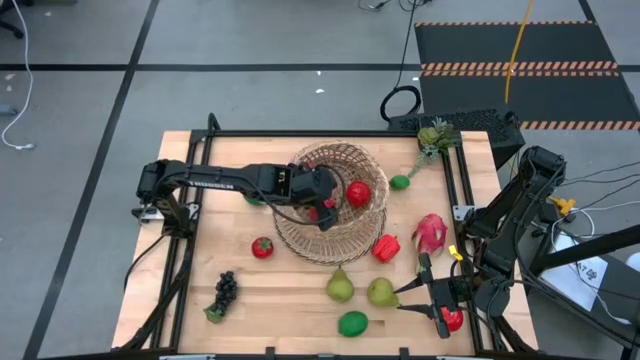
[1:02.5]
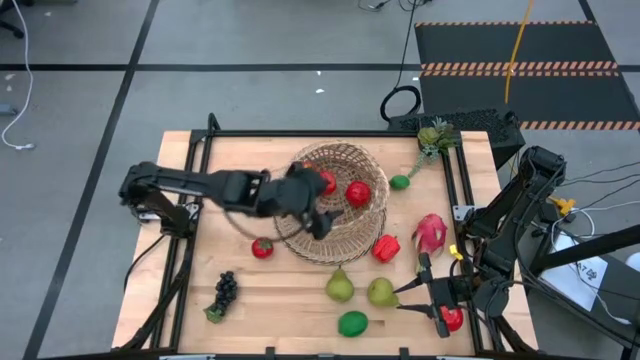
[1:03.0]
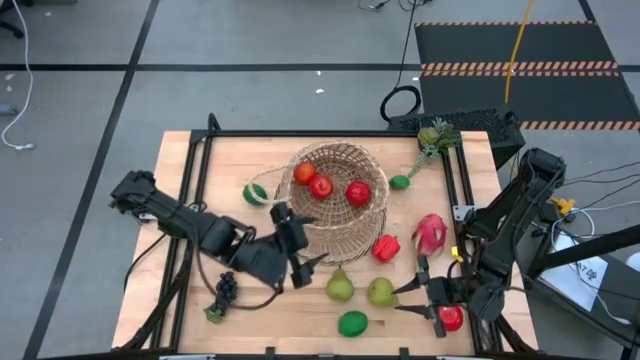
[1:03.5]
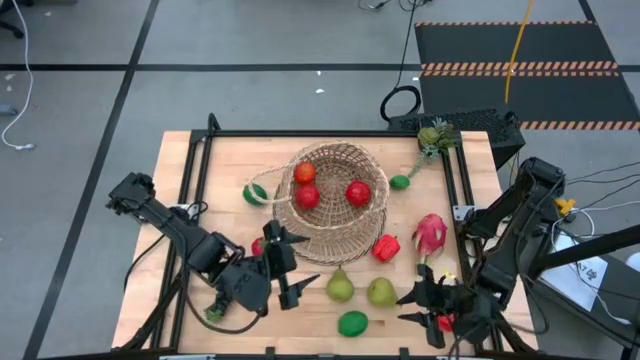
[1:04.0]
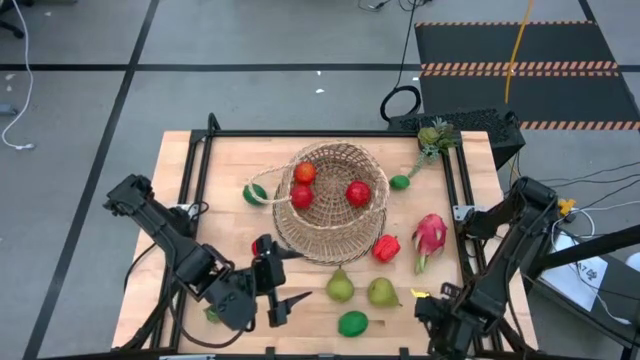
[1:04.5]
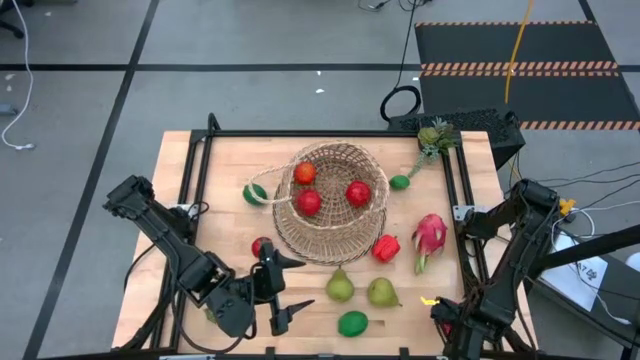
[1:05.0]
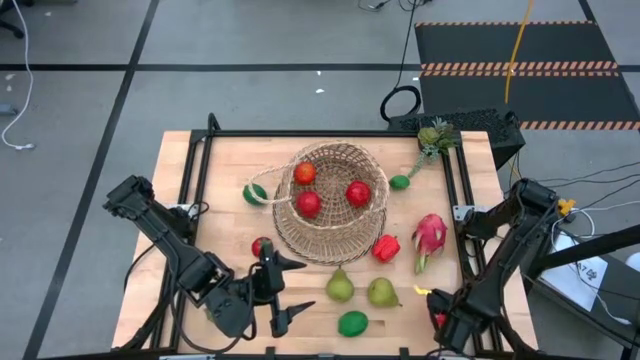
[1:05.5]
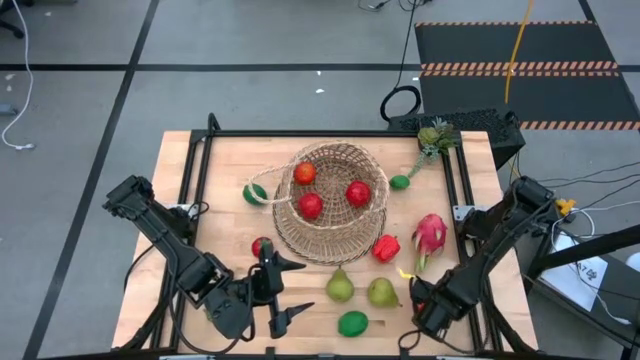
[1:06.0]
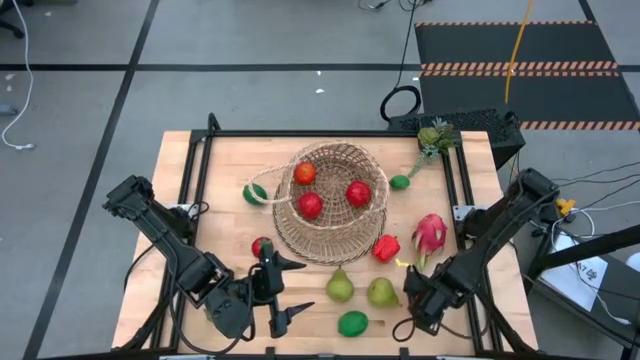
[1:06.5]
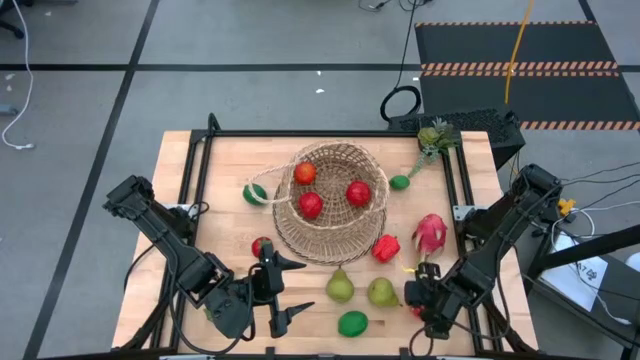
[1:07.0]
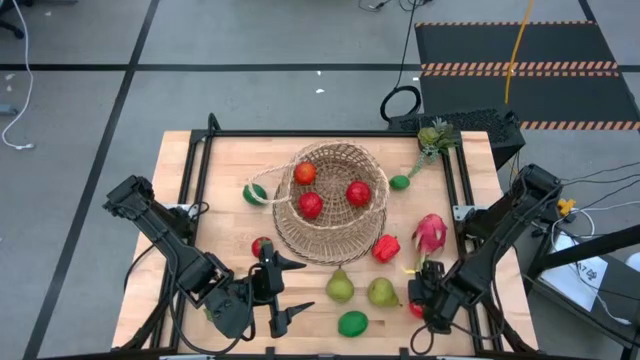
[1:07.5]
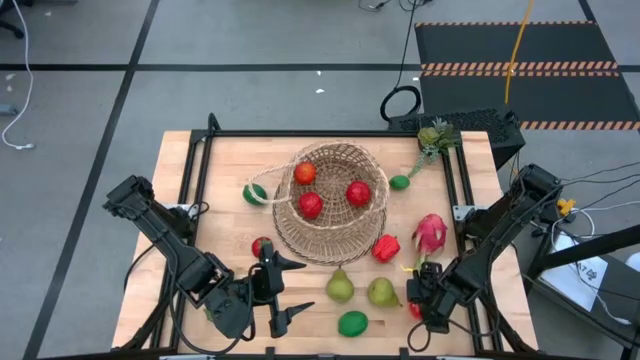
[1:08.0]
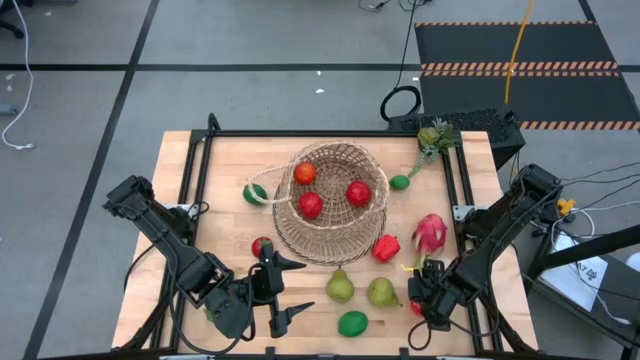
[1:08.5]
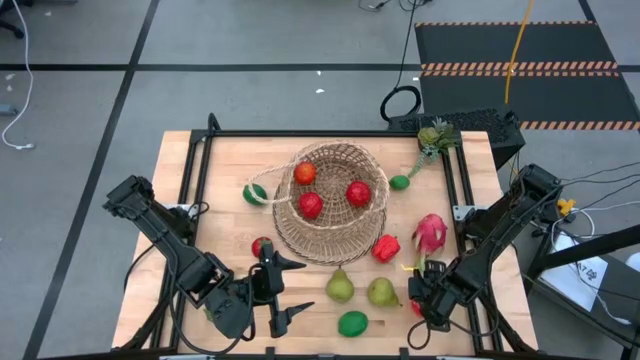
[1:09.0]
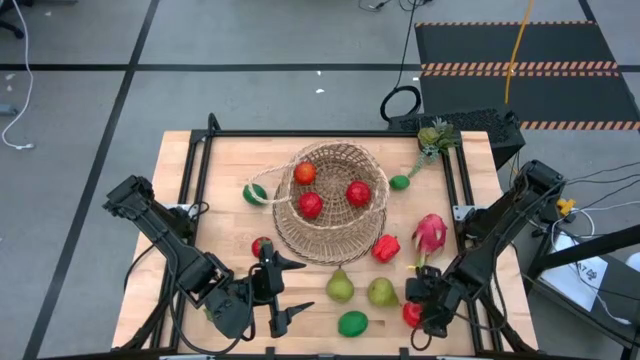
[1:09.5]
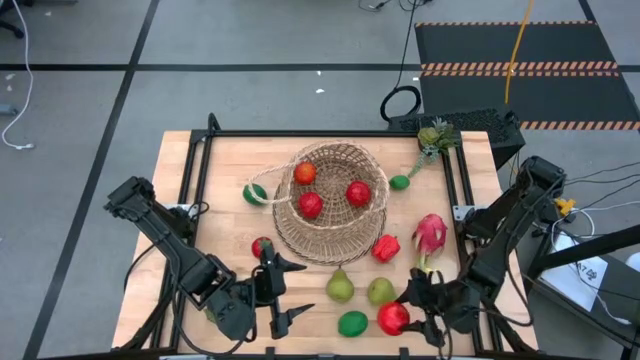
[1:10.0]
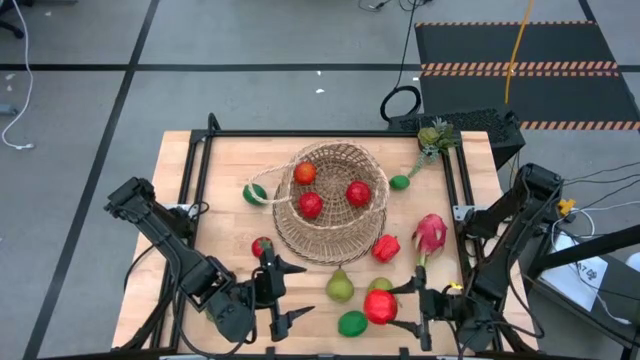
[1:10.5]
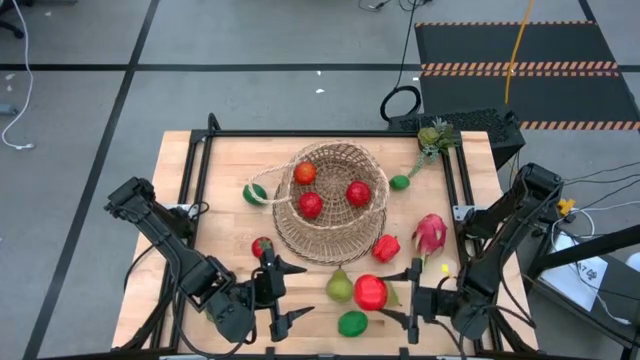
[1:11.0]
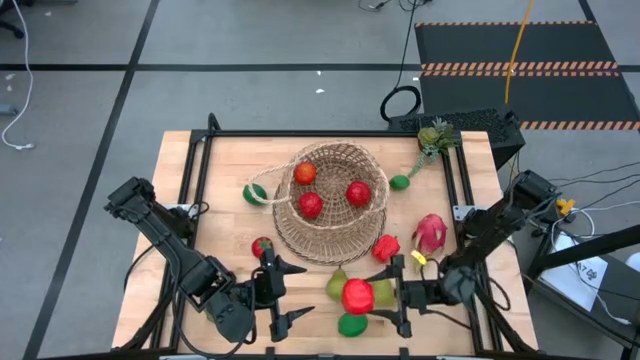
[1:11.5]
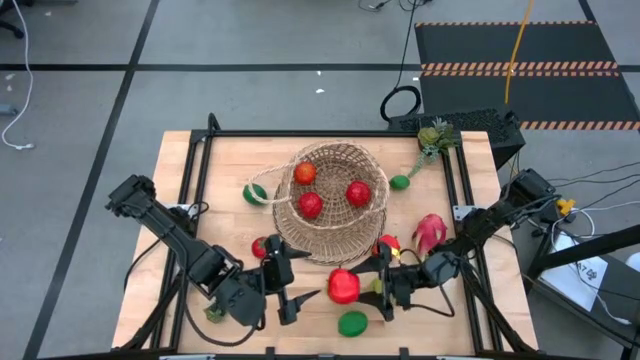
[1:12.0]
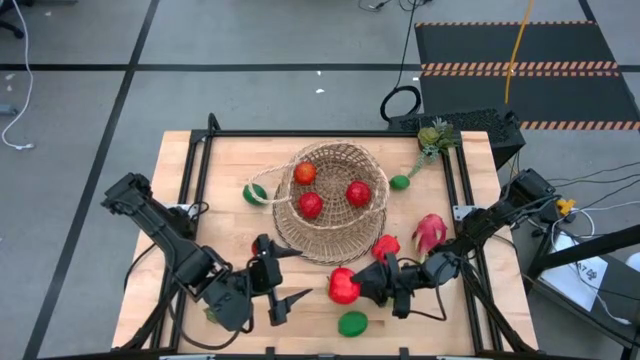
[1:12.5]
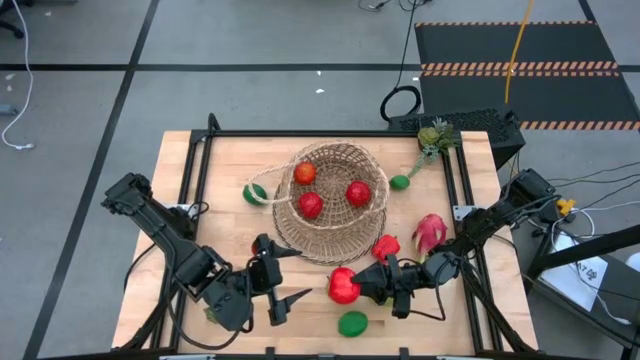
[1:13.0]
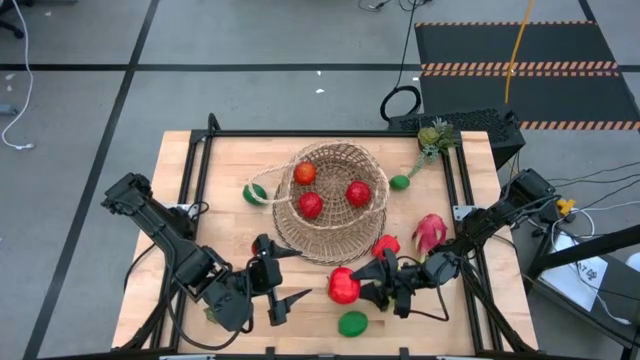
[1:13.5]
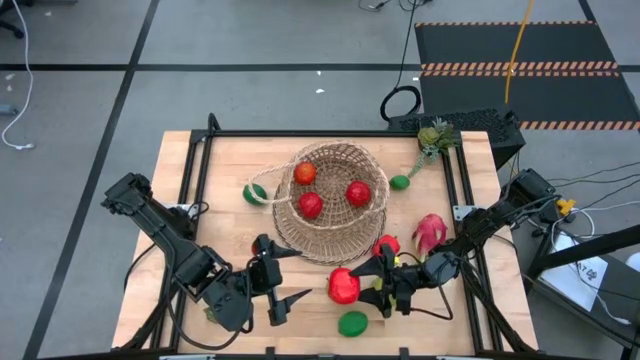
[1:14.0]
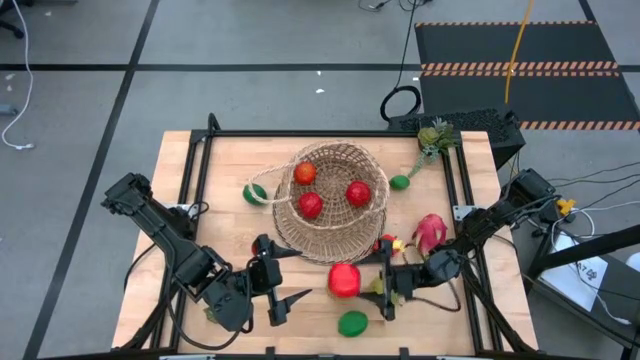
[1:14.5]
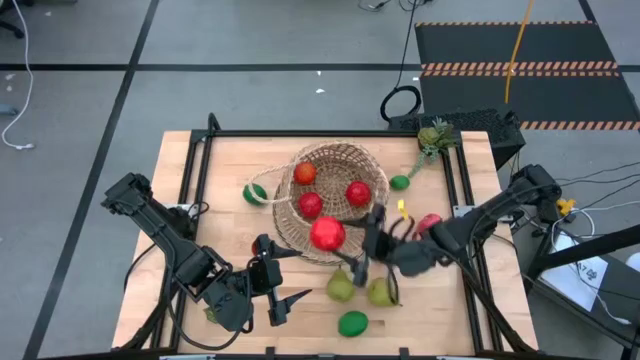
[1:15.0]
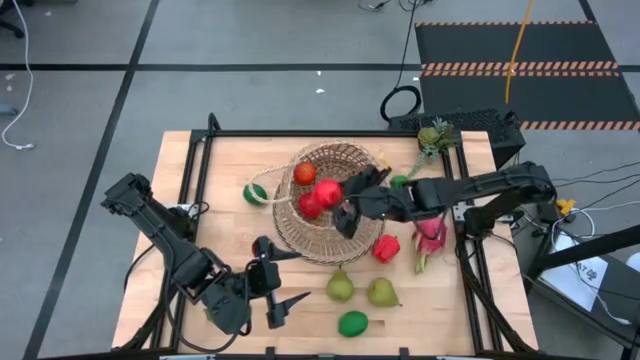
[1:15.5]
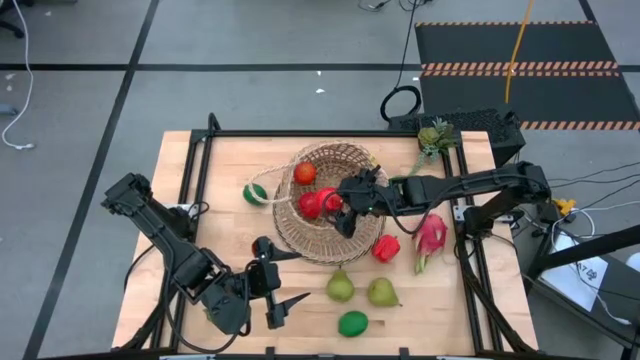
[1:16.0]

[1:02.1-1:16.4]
Task: Build produce basket
Put the red apple into the basket

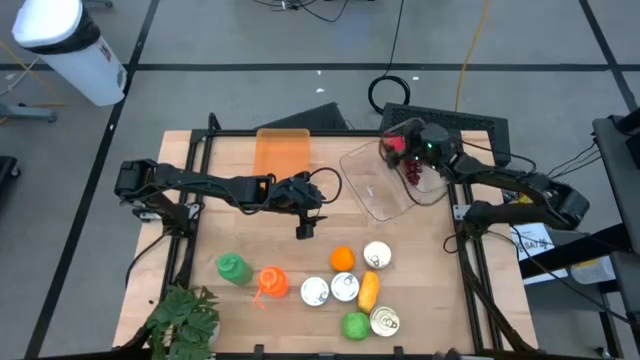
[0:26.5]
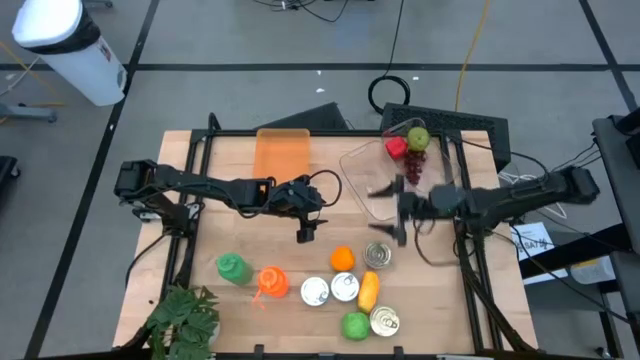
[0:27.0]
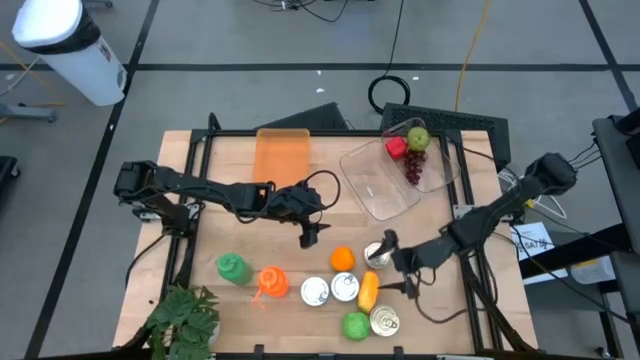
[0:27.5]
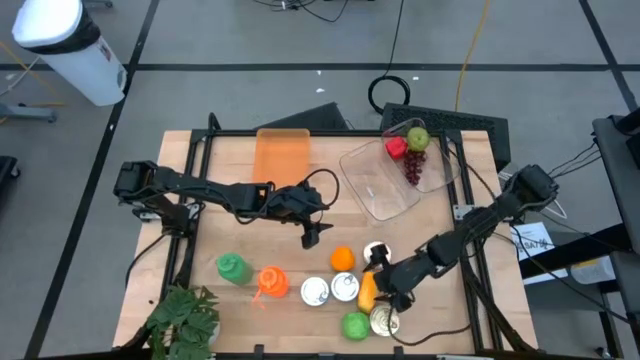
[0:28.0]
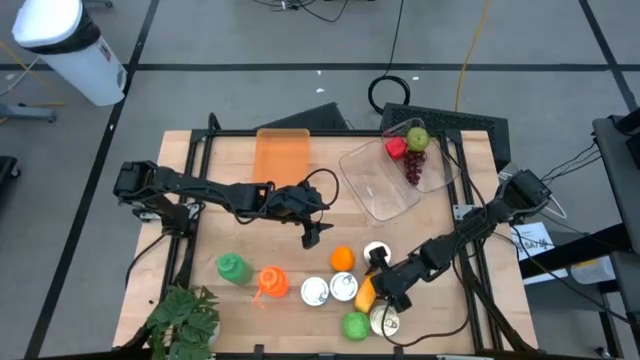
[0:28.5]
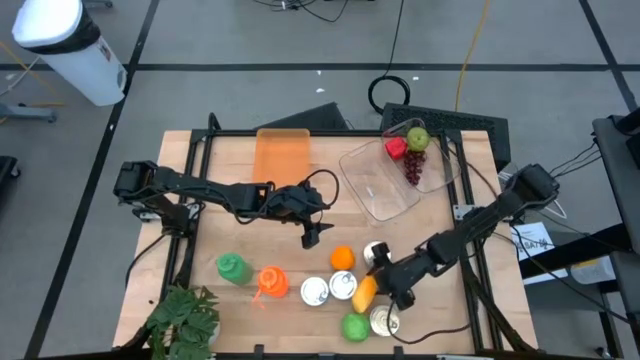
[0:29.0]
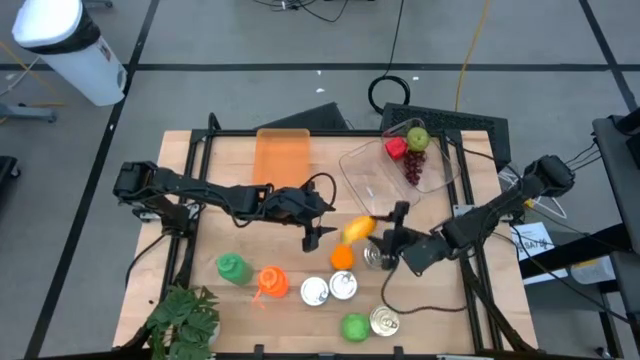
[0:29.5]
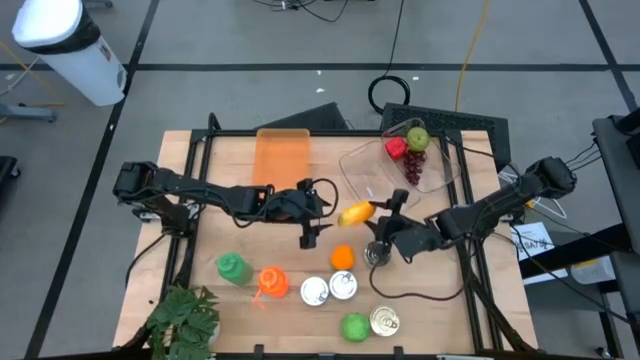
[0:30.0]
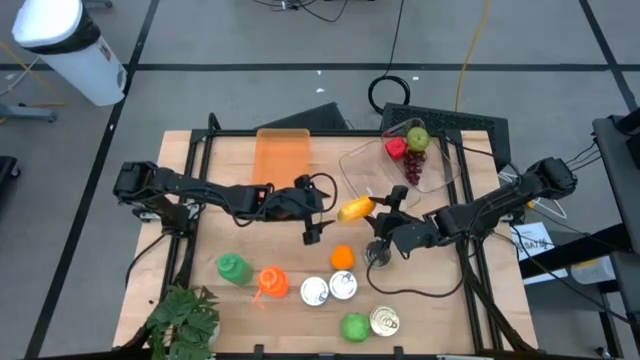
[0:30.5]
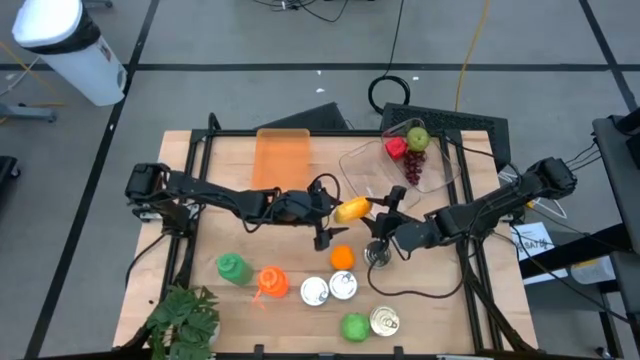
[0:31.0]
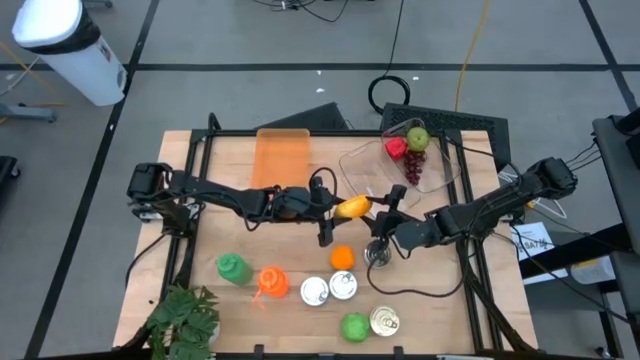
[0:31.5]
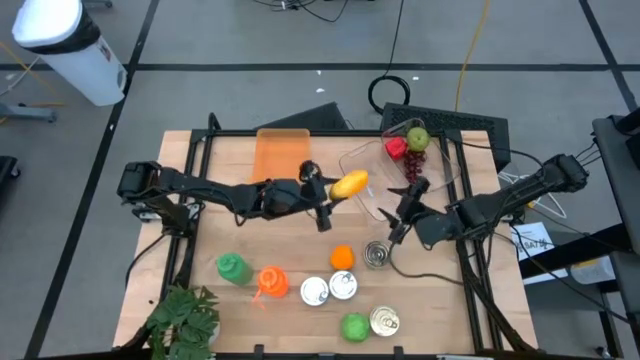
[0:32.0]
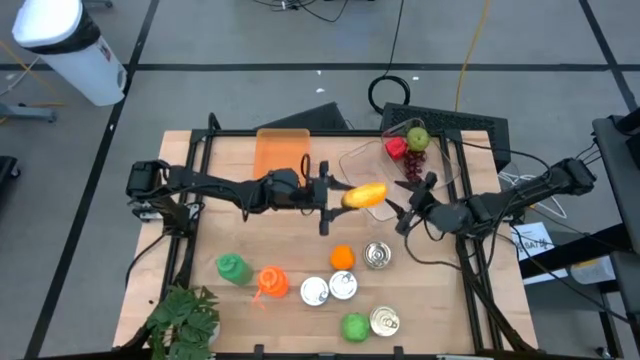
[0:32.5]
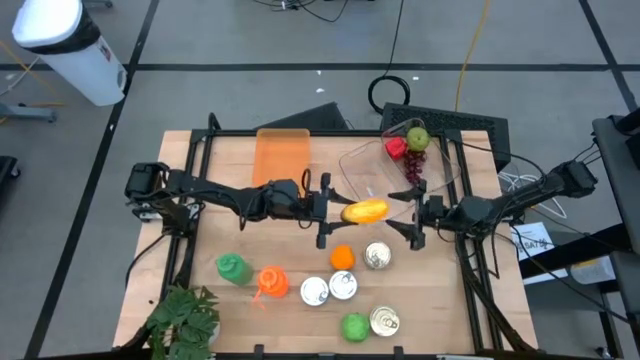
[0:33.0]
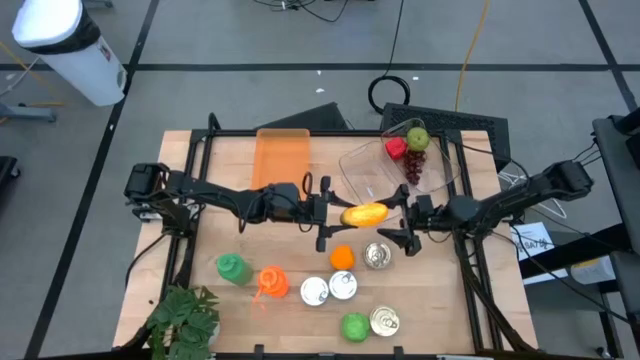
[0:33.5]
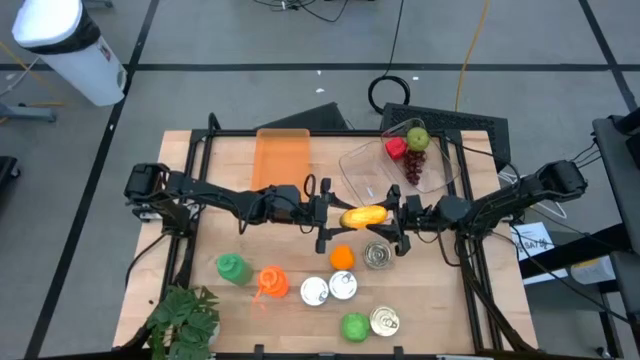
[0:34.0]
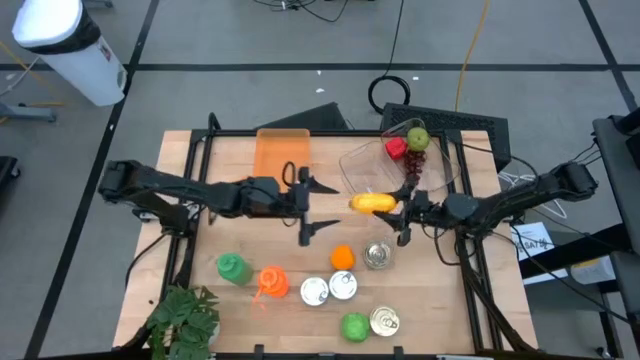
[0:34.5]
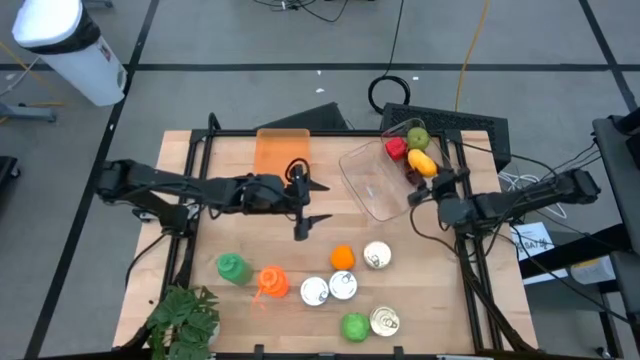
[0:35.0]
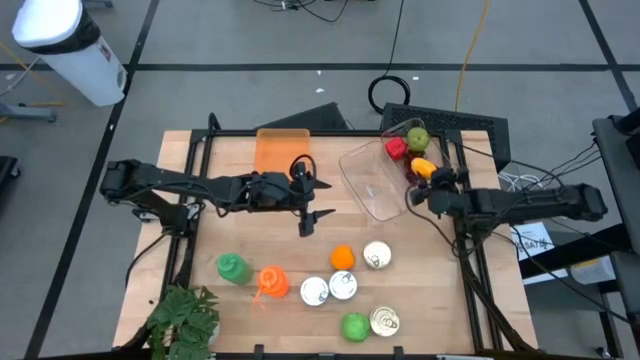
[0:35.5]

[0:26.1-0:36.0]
Task: Pick & Place Food Item
Put the yellow mango into the right transparent bin
